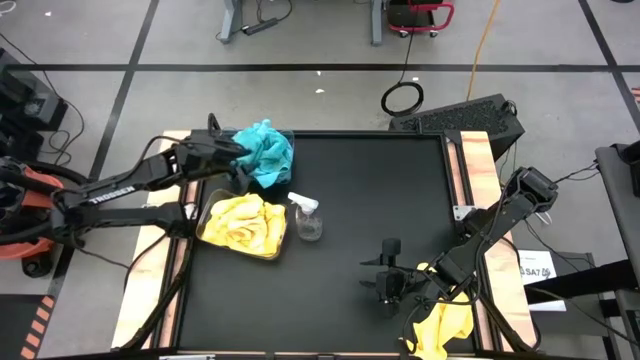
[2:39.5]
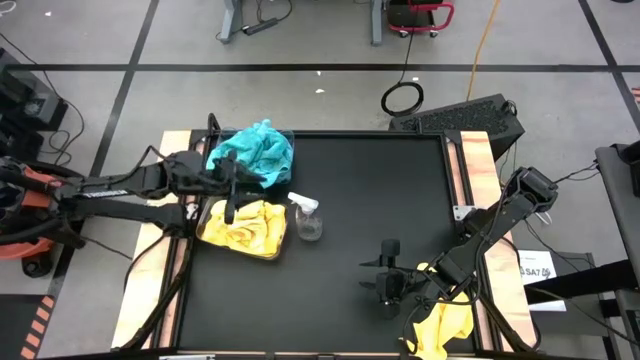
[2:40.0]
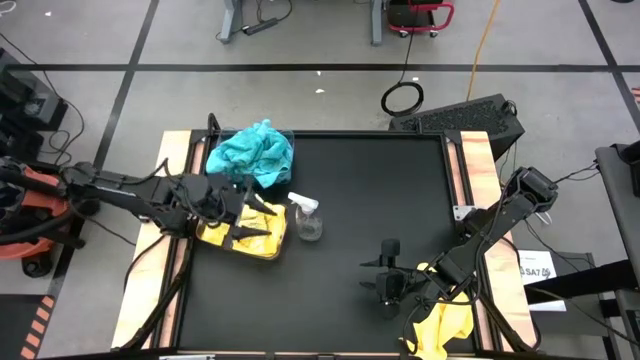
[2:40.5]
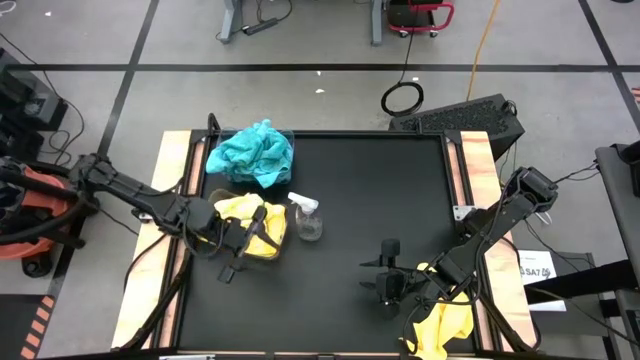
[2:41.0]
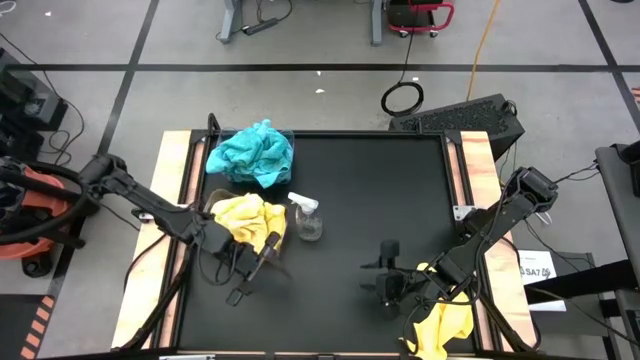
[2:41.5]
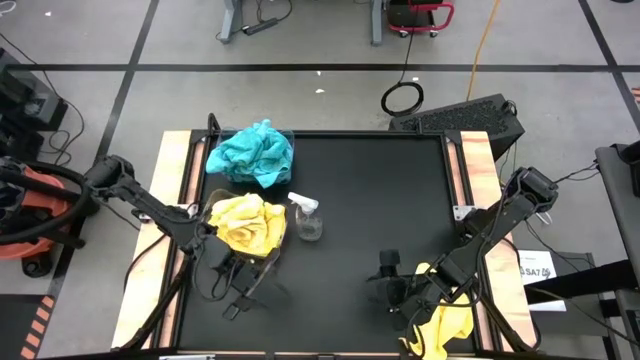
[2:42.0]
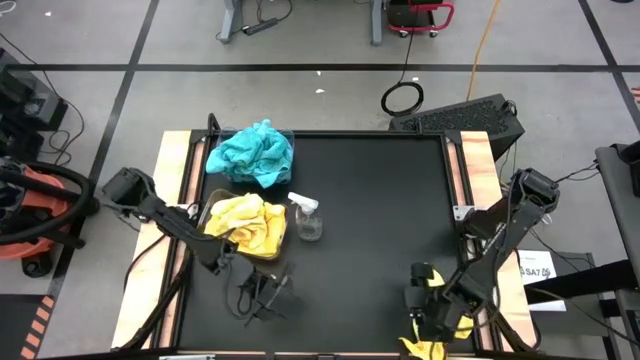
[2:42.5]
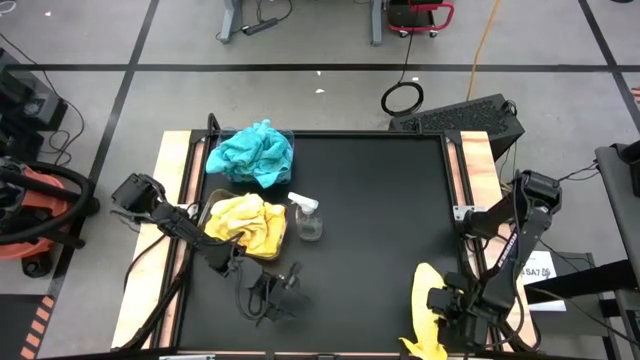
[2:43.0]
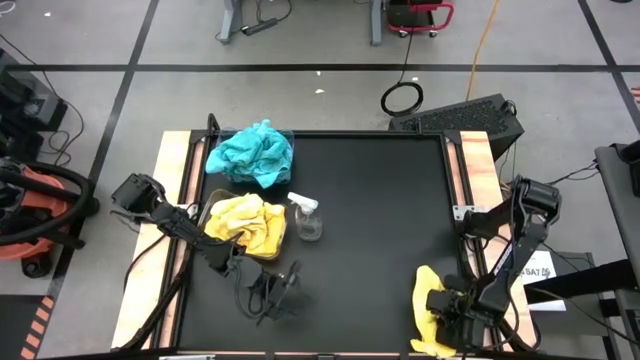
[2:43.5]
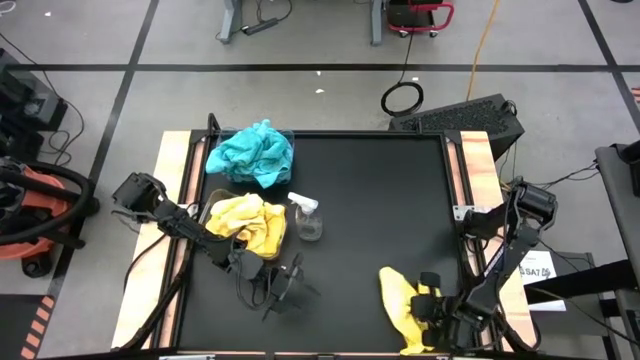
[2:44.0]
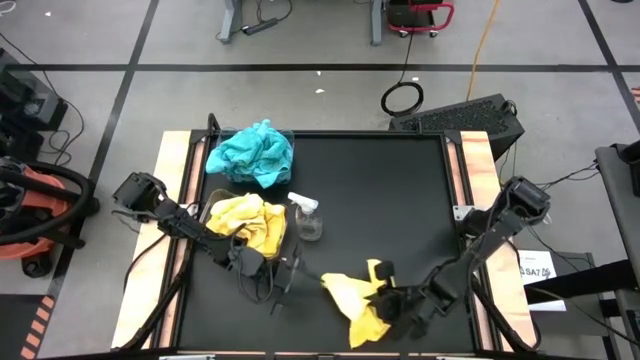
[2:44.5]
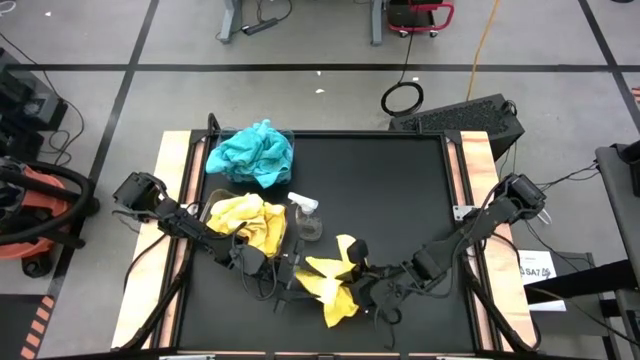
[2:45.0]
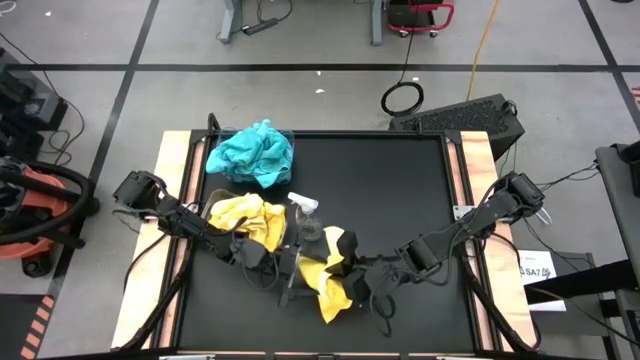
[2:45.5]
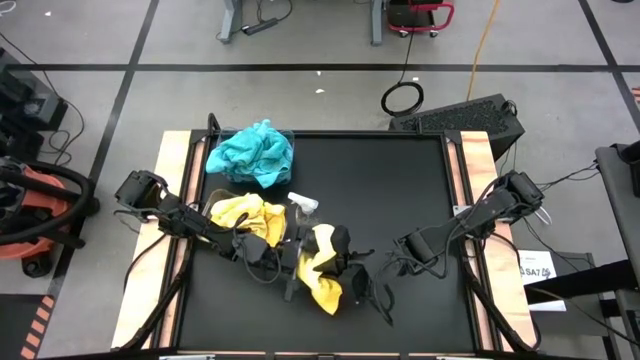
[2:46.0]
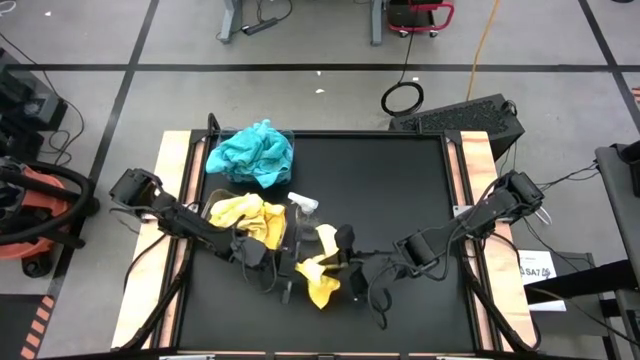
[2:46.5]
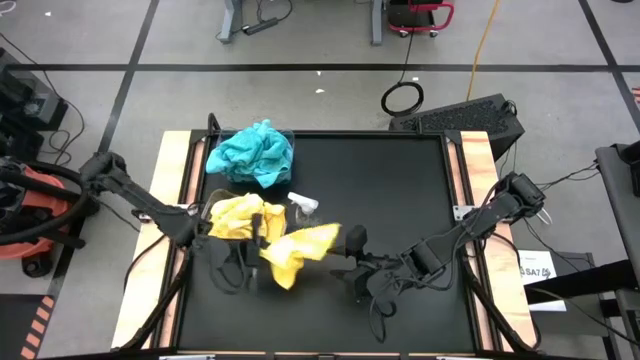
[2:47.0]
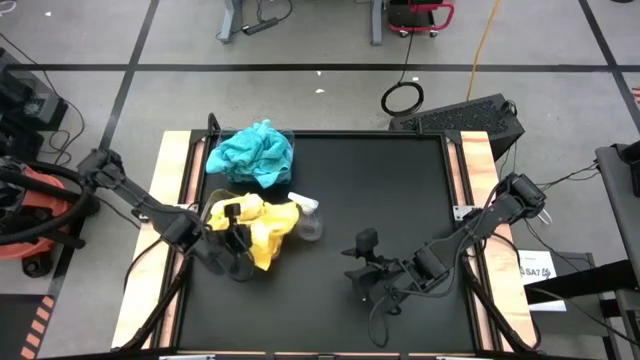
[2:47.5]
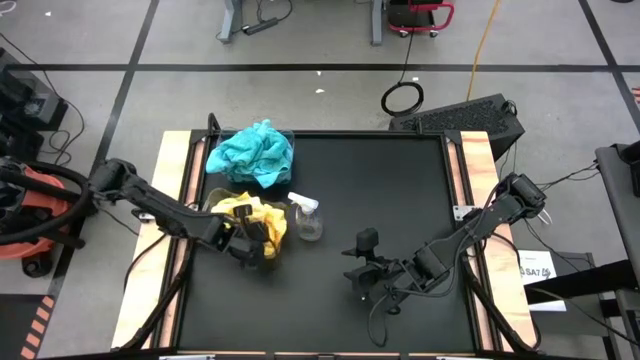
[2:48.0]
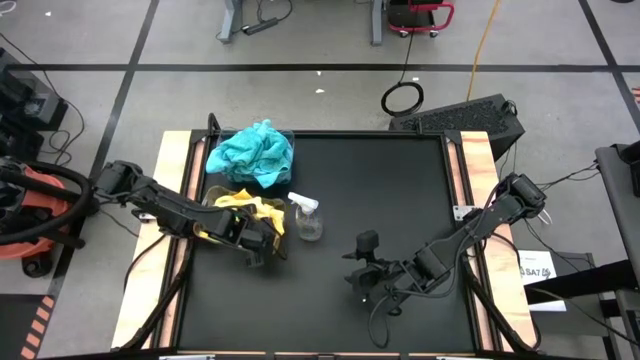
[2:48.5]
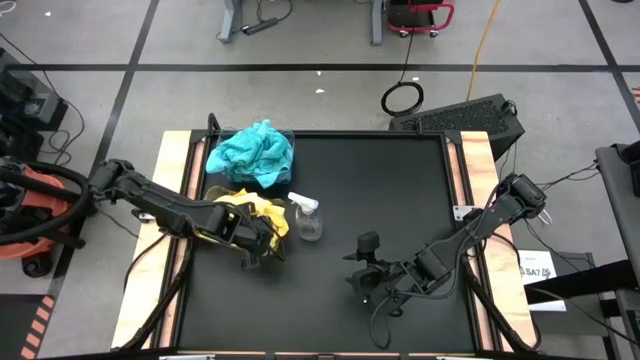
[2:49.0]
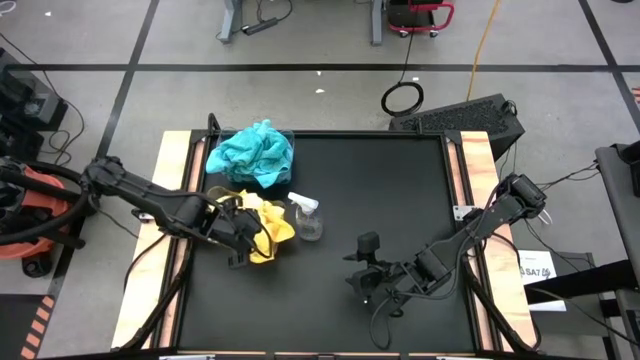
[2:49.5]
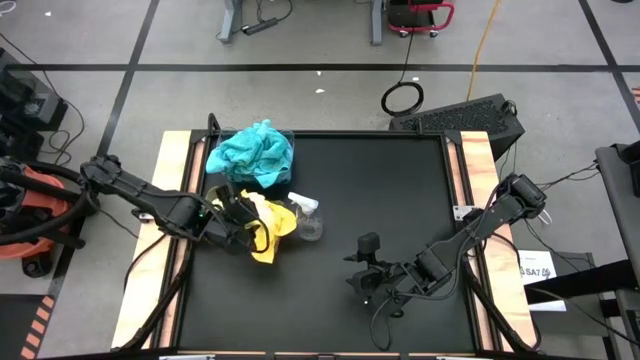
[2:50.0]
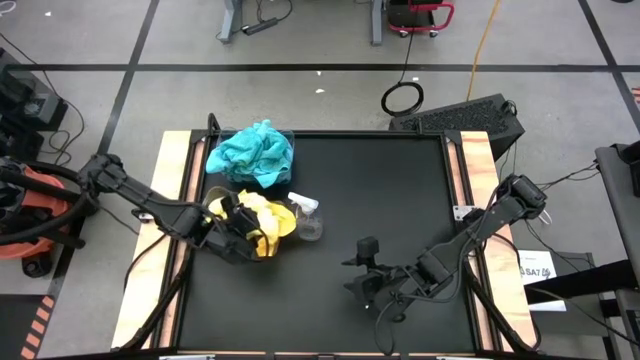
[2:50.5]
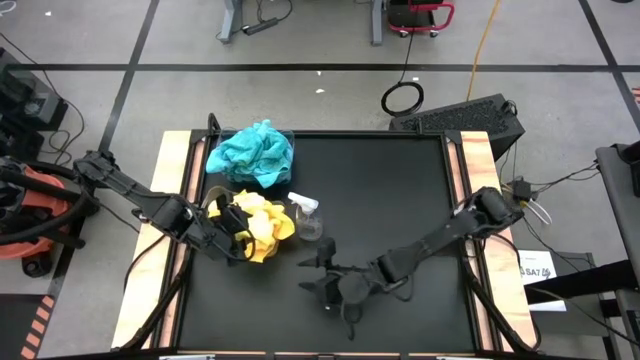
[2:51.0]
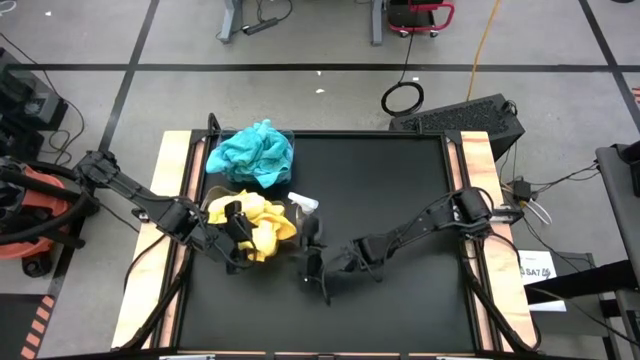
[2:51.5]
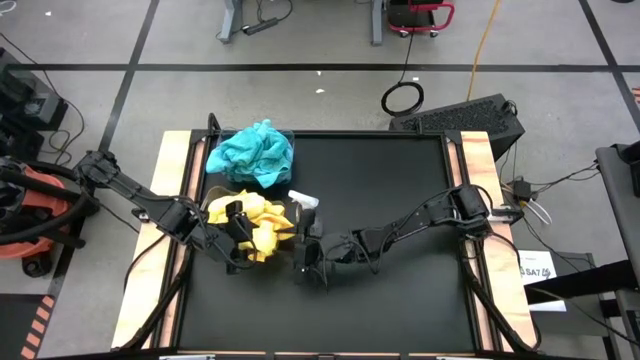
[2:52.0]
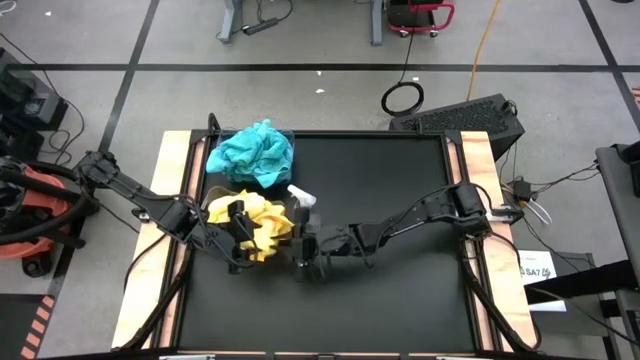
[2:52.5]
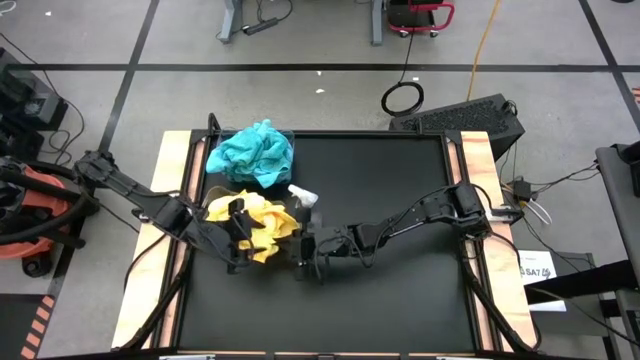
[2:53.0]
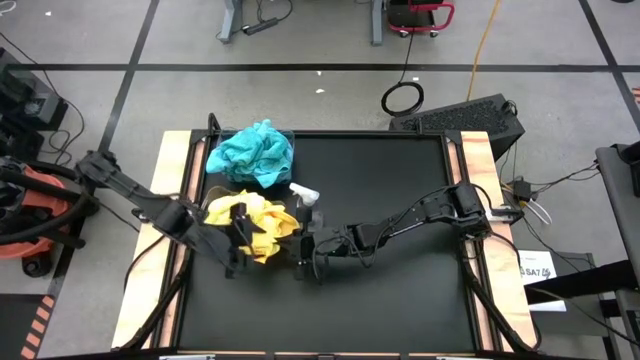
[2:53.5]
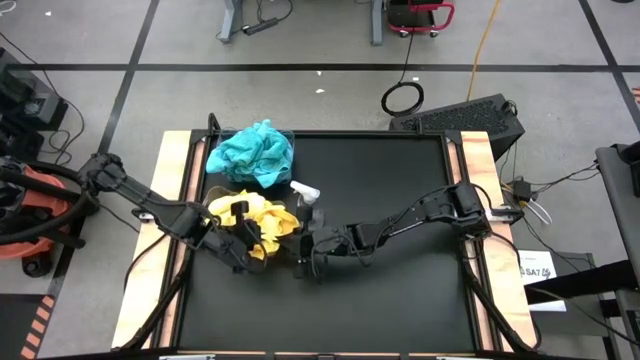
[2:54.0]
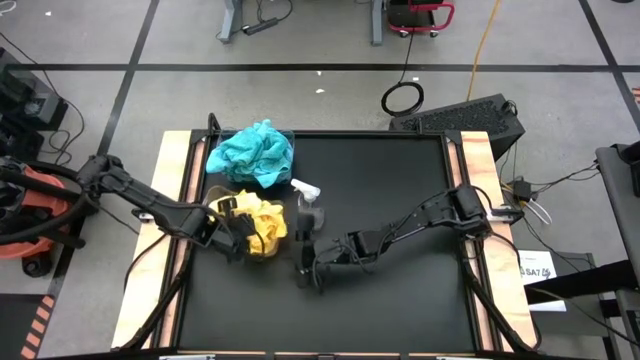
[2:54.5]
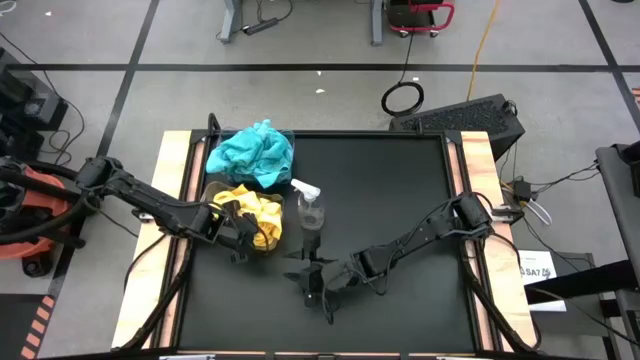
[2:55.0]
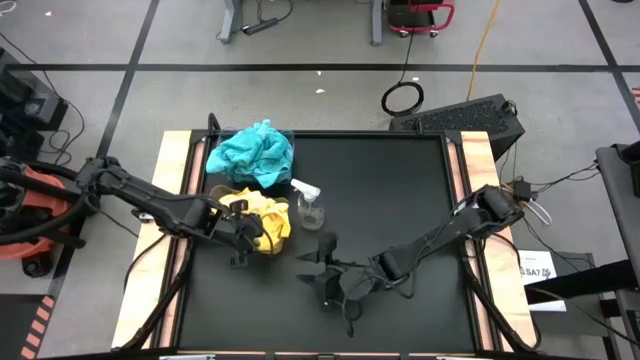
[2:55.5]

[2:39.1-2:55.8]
Task: Sort microfiber towel by color & place in baskets
Put the yellow microfiber cloth into the bottom transparent bin

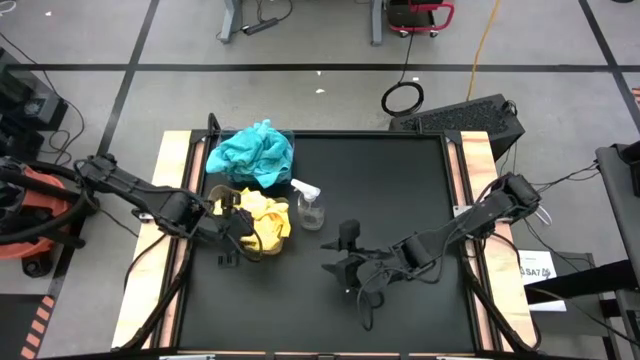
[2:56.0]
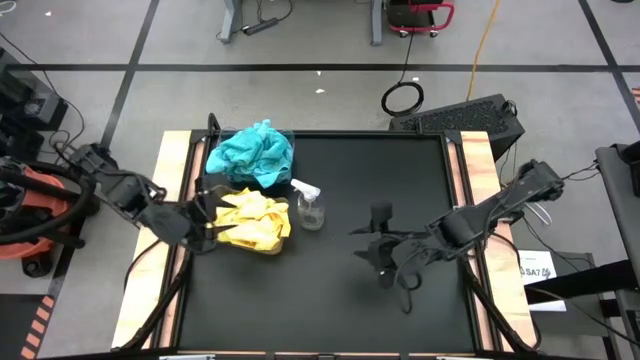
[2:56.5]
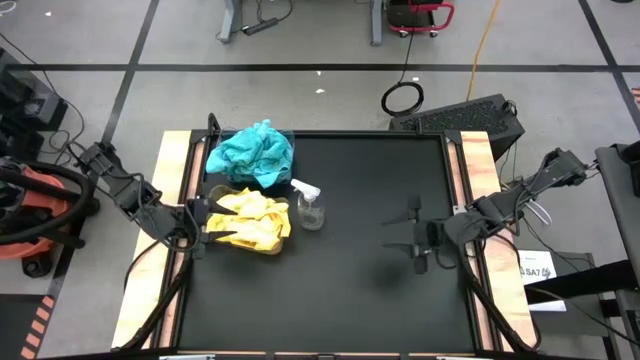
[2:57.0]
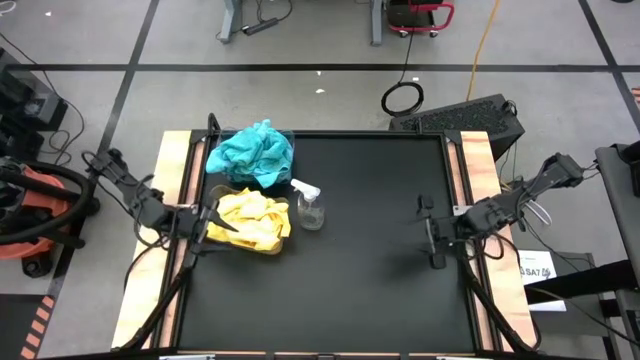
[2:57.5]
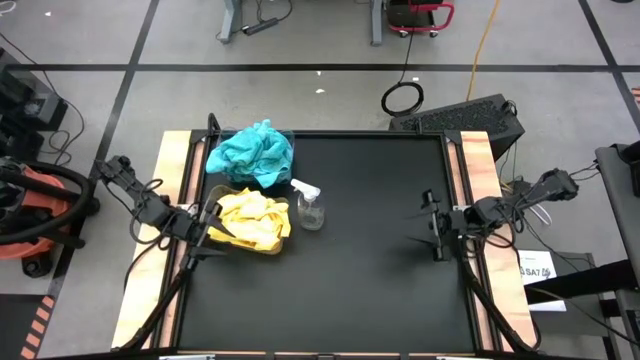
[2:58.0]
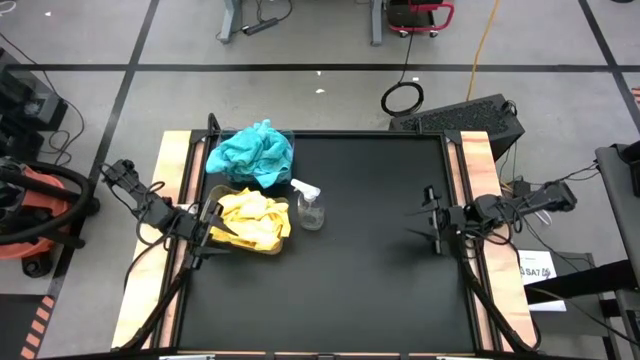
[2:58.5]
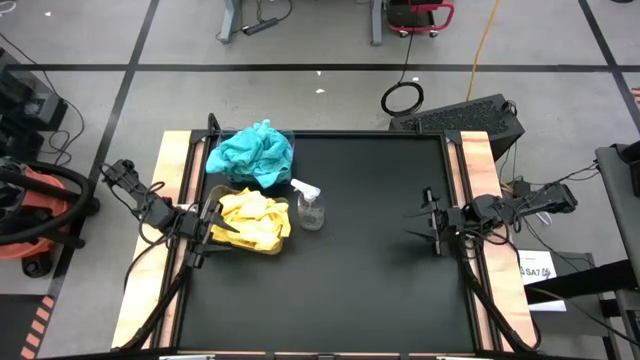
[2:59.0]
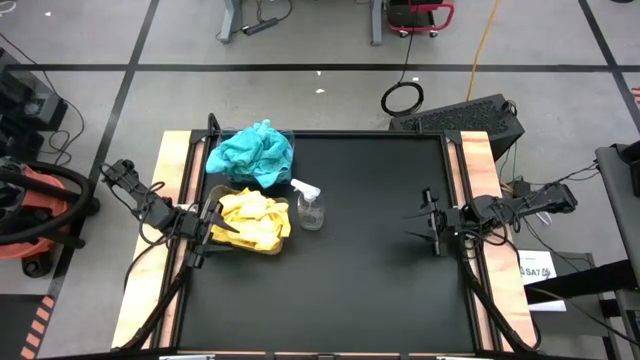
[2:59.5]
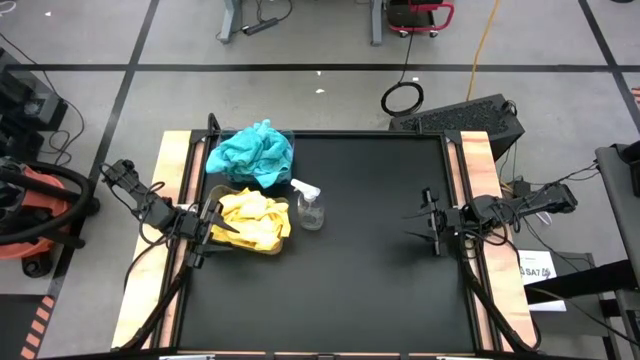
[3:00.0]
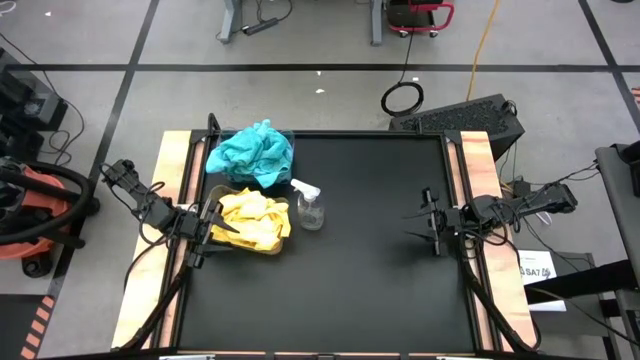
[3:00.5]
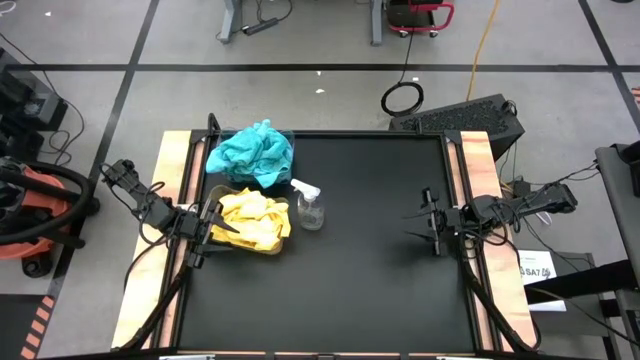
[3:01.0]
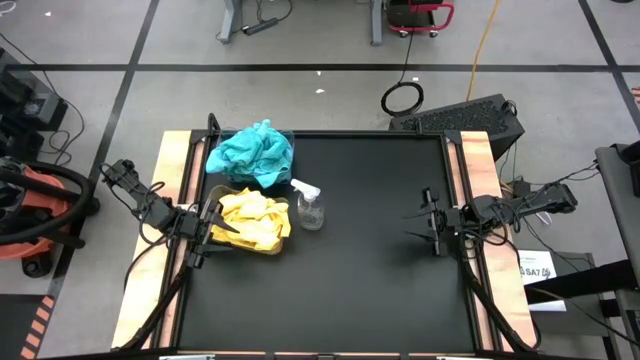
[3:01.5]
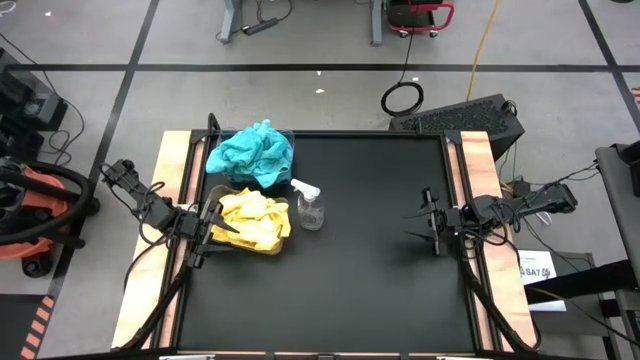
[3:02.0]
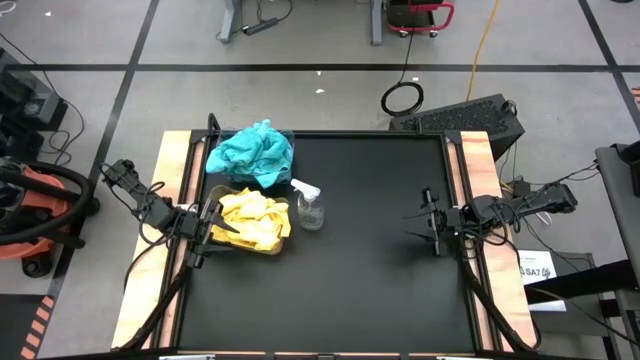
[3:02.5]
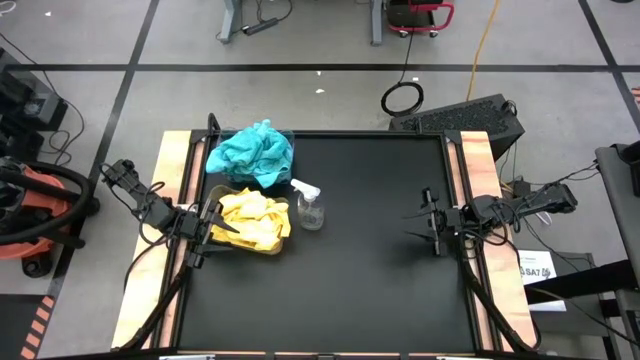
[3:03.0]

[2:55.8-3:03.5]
Return to Home Position
